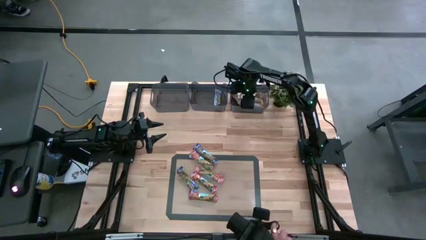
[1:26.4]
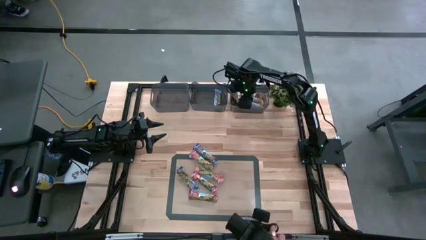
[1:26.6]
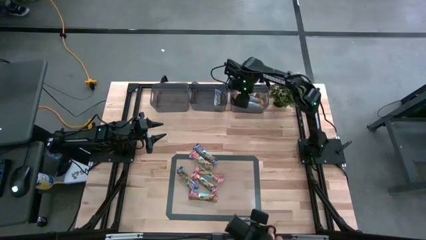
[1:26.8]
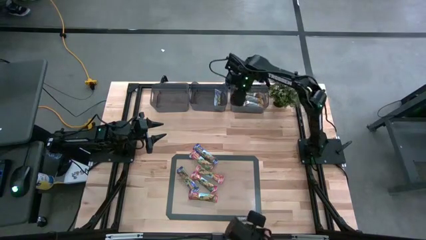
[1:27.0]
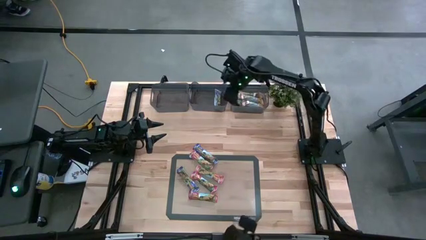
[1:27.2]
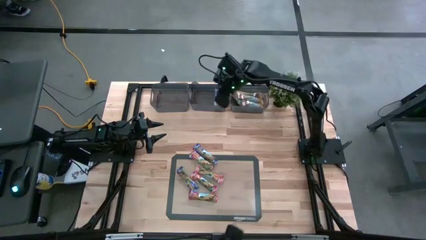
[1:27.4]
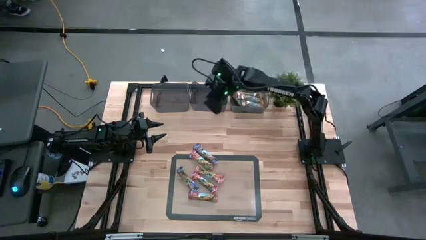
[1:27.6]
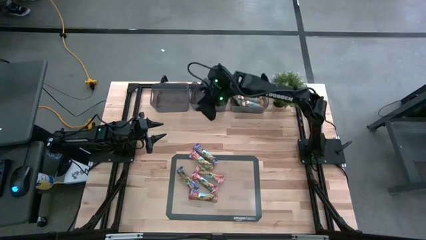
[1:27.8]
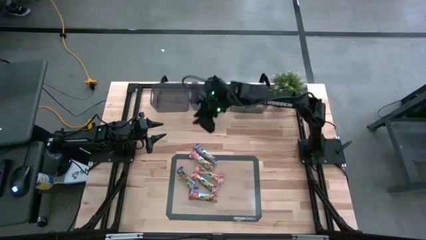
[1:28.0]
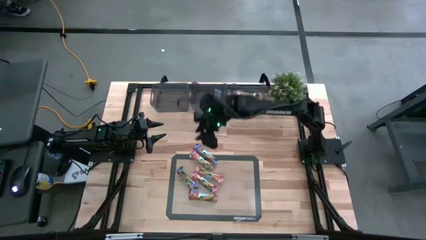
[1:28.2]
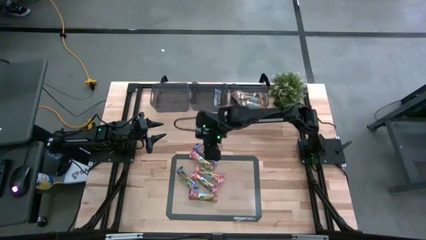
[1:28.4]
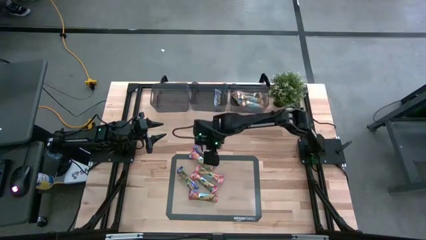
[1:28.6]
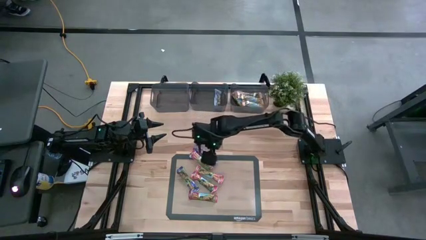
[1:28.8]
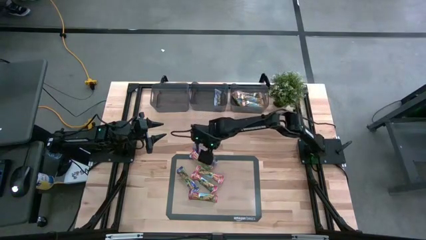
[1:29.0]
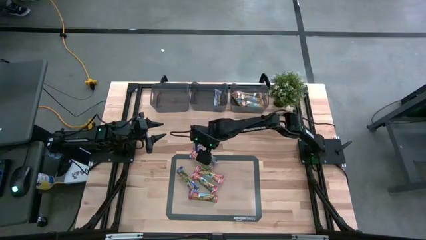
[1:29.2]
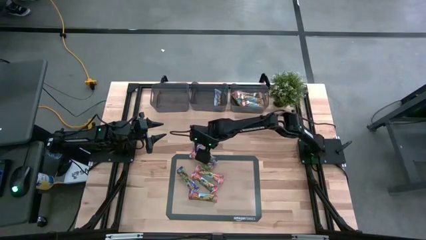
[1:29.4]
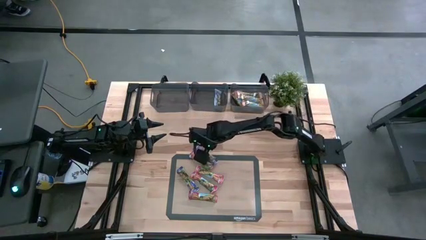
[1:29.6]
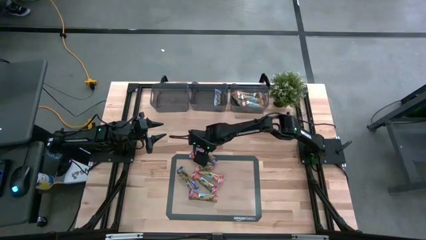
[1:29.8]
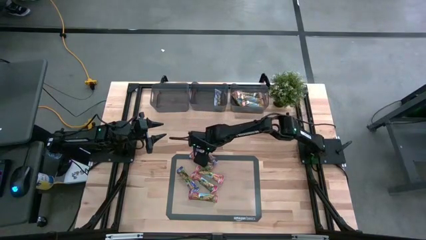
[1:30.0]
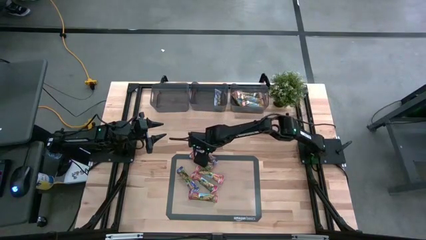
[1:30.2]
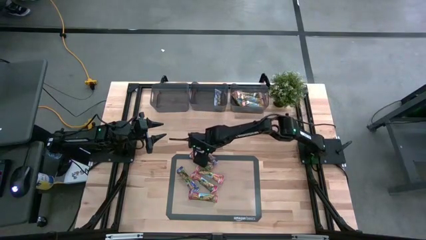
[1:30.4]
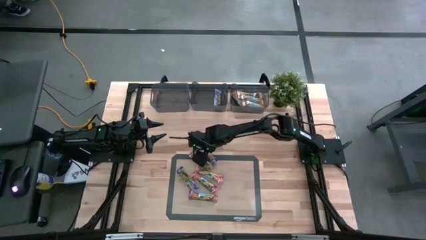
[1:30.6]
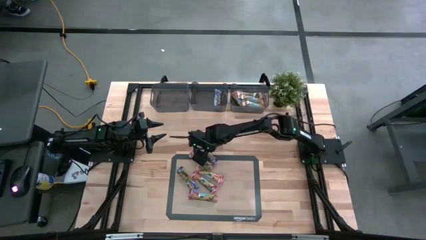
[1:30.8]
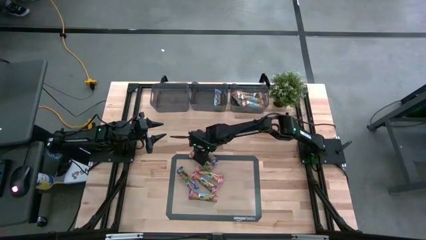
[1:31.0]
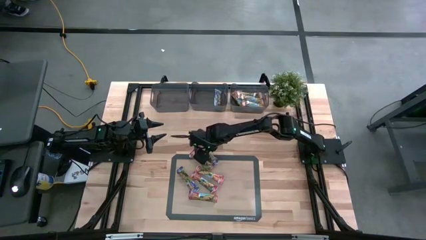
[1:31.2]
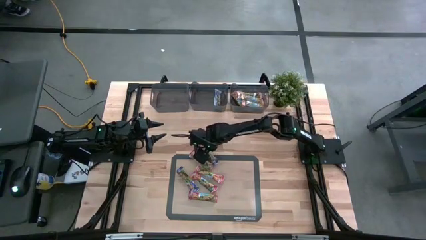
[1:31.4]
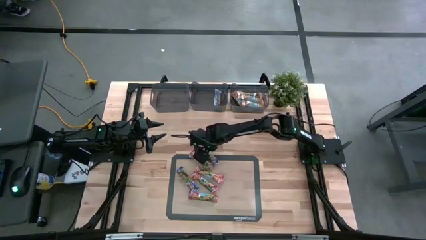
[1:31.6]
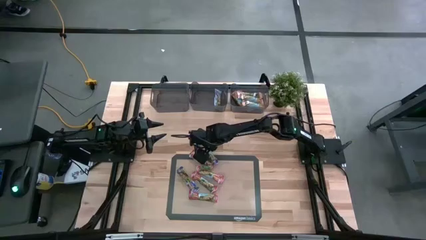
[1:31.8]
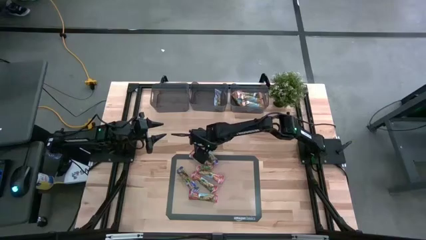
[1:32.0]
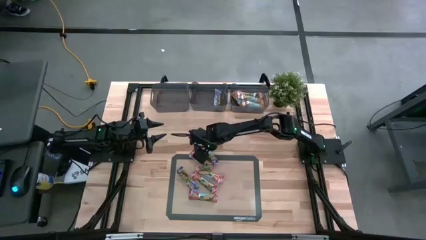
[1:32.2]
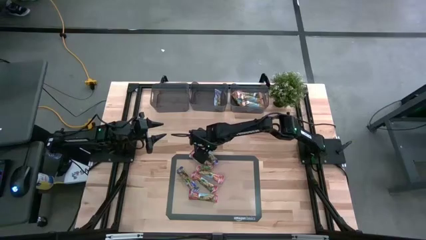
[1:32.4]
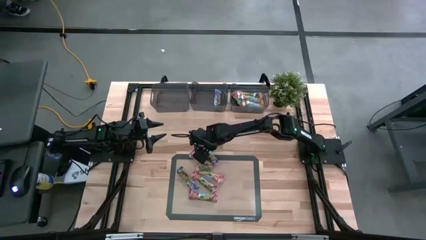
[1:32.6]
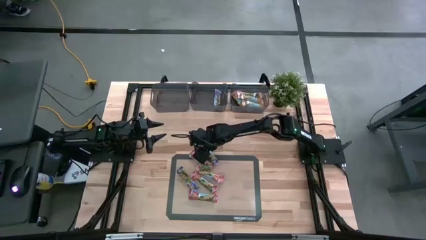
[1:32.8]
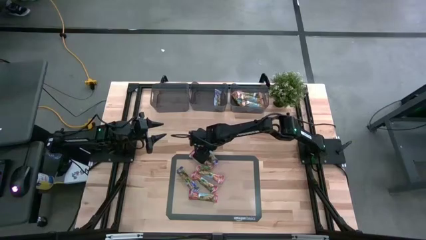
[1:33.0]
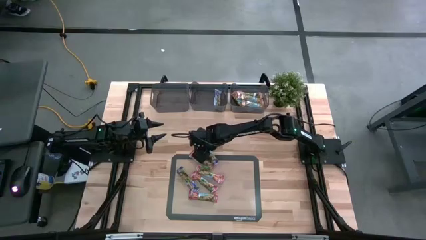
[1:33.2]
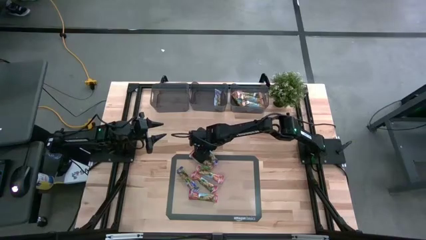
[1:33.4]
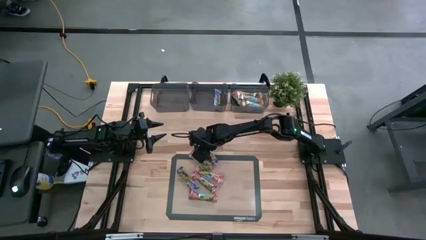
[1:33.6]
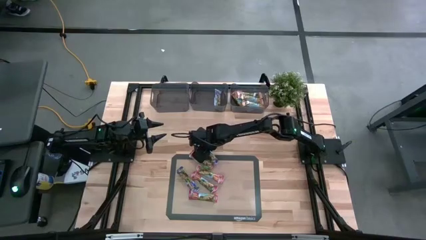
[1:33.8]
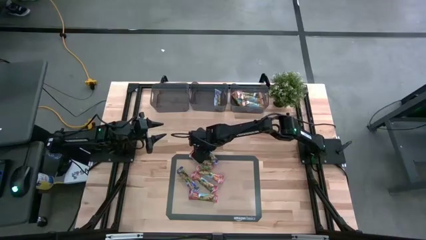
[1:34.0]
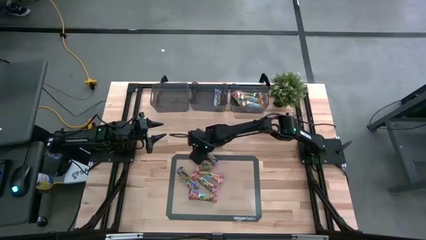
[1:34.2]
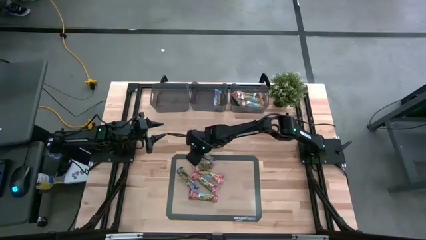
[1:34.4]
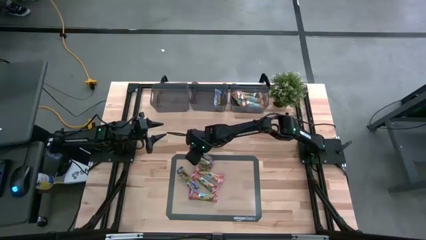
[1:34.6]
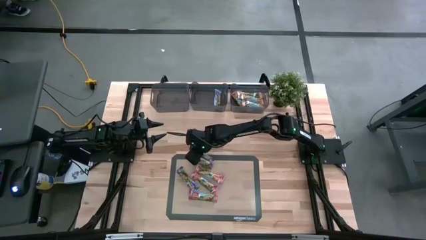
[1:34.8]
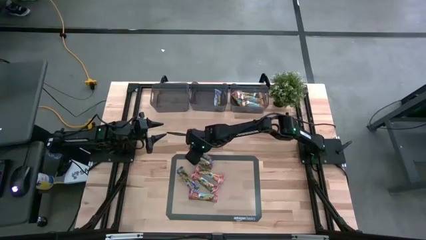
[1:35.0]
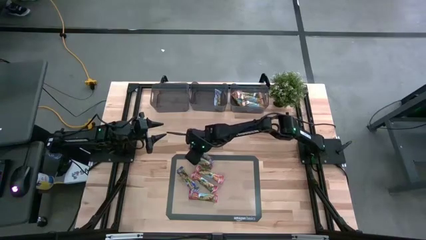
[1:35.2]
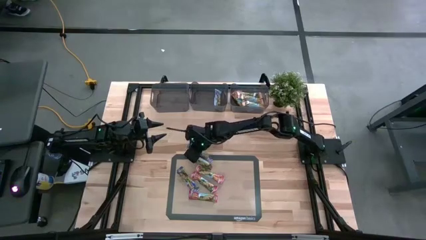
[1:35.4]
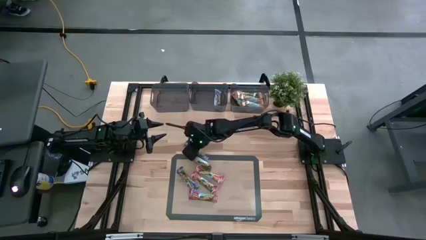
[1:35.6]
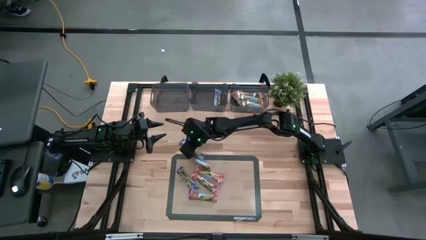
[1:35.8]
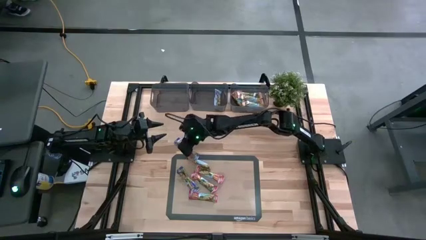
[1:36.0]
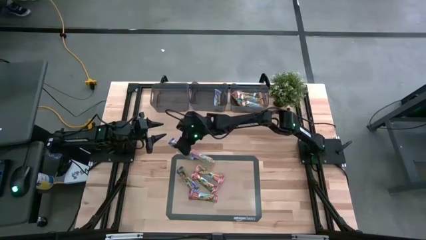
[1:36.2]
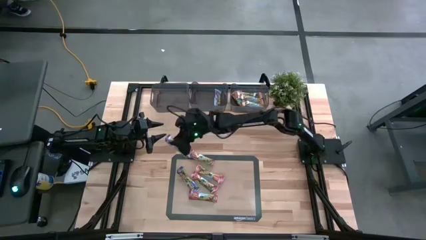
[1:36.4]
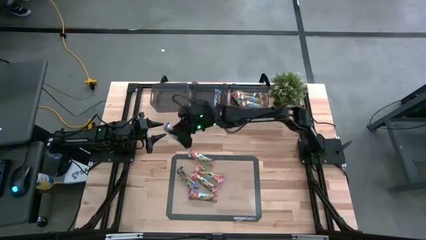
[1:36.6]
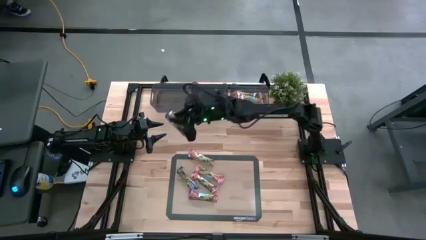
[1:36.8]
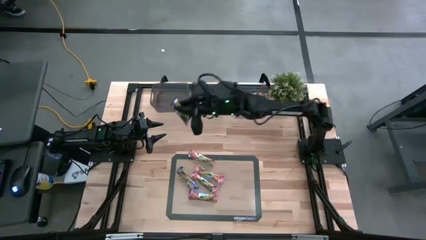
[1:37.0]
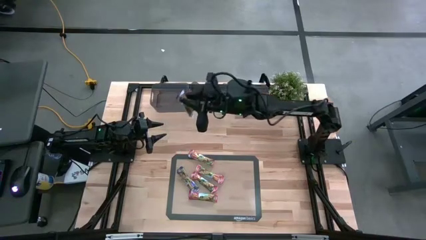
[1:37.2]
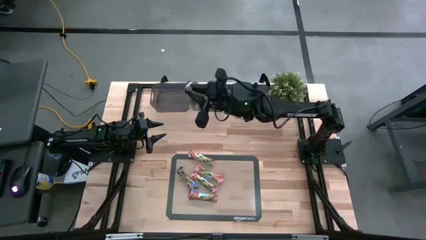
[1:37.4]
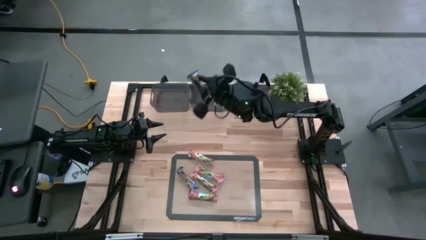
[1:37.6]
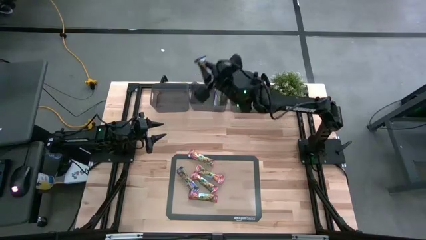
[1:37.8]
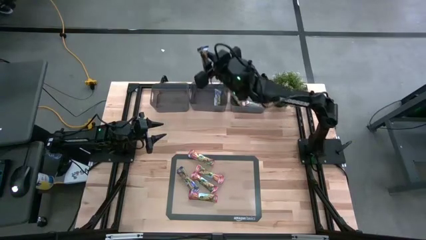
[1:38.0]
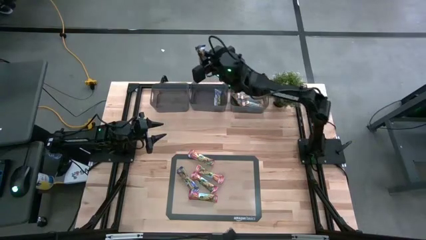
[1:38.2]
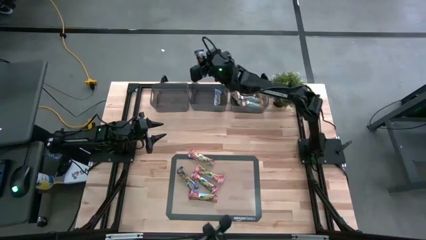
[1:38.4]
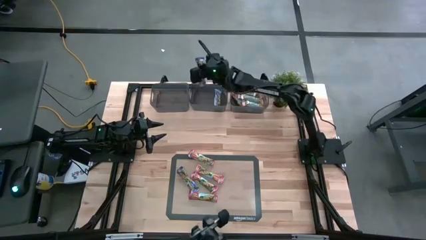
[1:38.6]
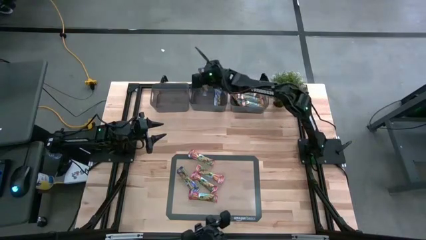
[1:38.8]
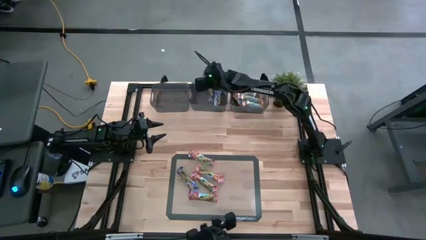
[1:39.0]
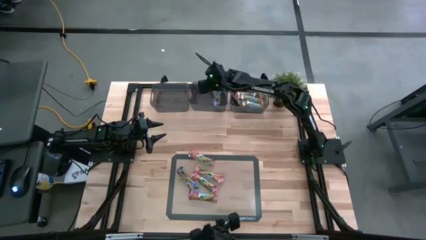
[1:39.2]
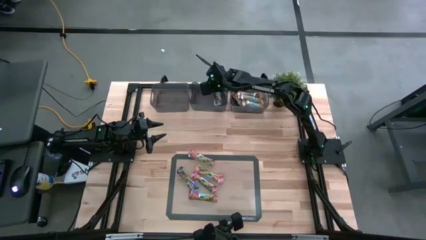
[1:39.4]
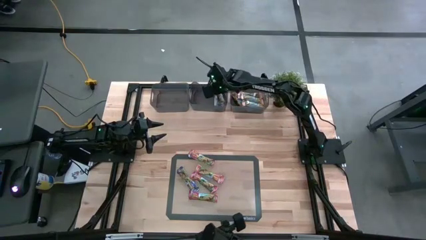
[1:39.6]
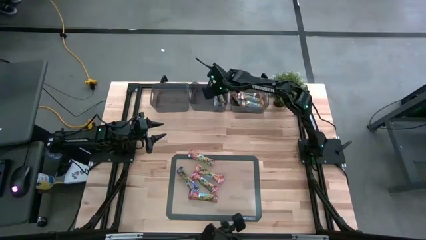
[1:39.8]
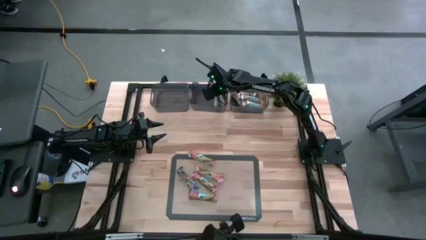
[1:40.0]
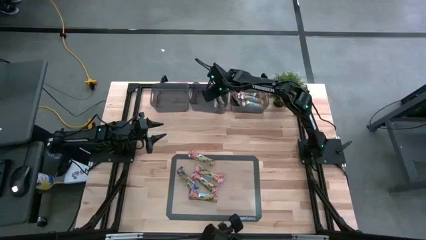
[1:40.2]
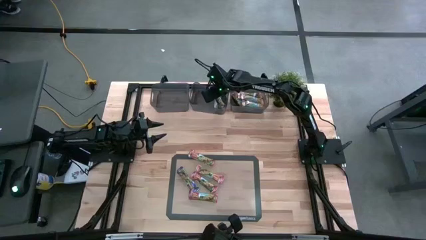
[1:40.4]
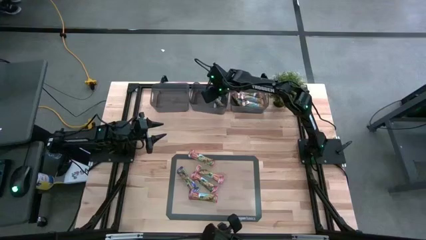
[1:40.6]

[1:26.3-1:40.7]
Task: Pick and place Granola Bars by type
Put the blue granola bar into the middle black bin

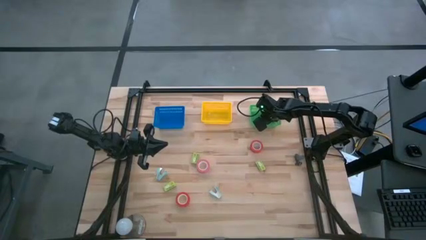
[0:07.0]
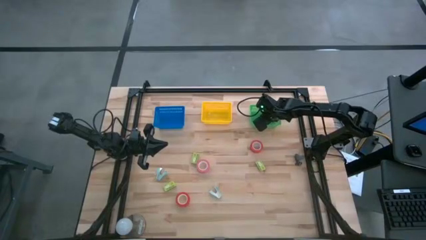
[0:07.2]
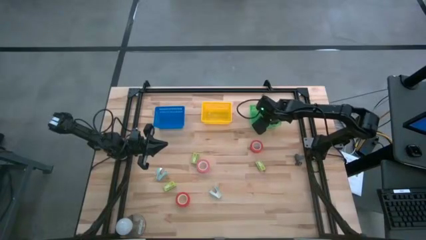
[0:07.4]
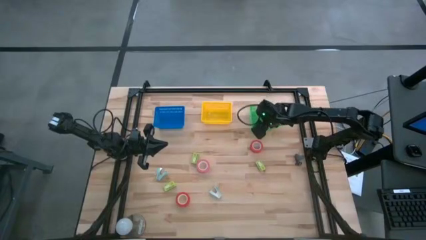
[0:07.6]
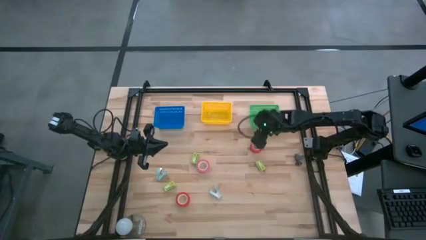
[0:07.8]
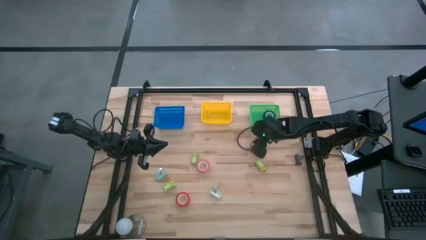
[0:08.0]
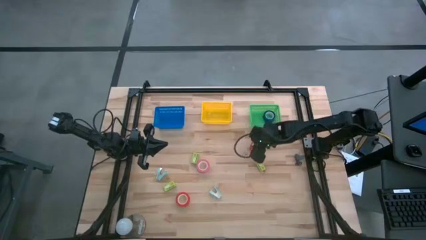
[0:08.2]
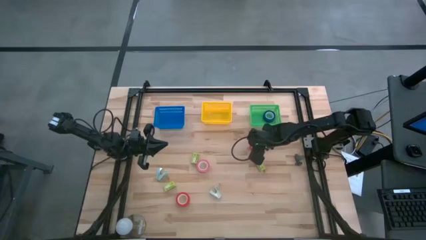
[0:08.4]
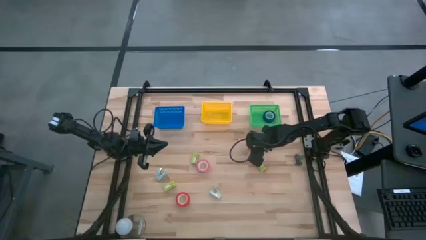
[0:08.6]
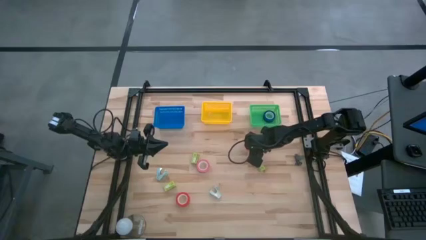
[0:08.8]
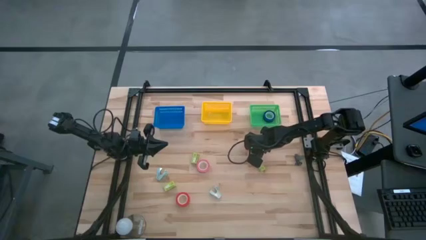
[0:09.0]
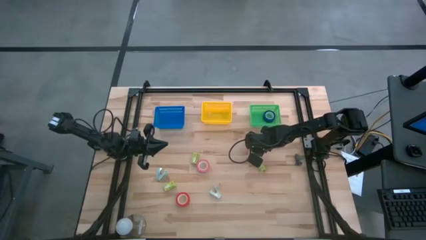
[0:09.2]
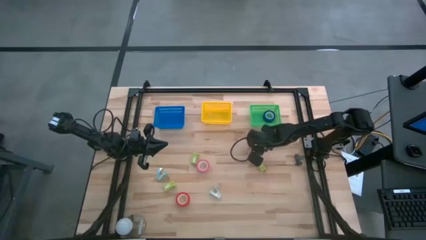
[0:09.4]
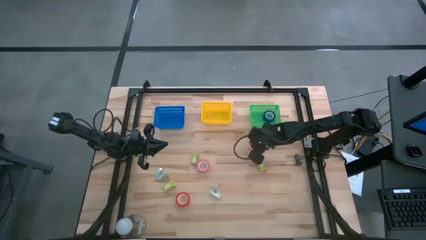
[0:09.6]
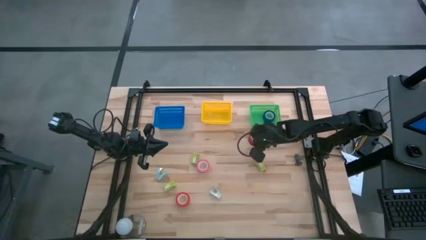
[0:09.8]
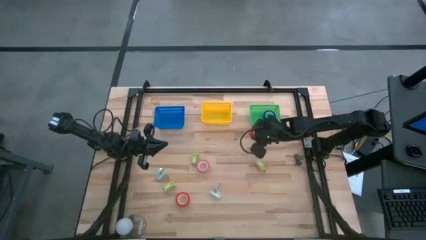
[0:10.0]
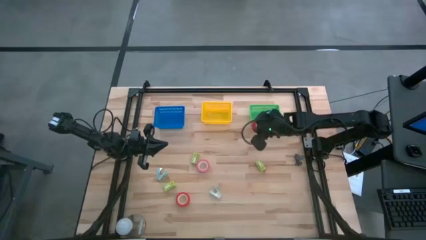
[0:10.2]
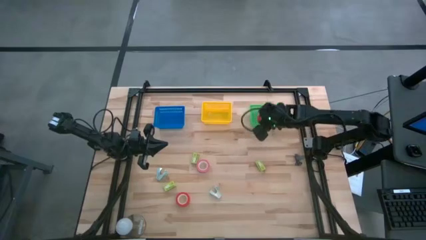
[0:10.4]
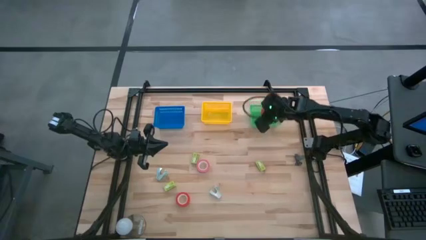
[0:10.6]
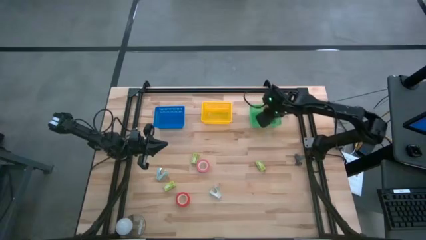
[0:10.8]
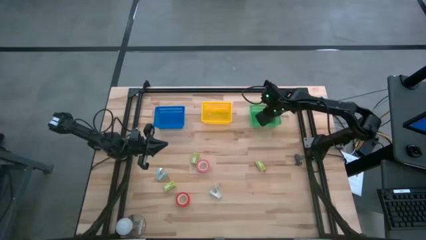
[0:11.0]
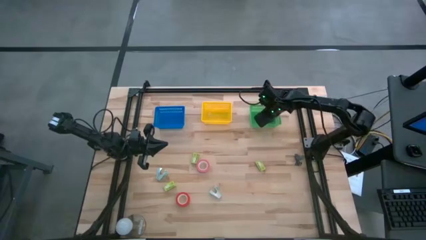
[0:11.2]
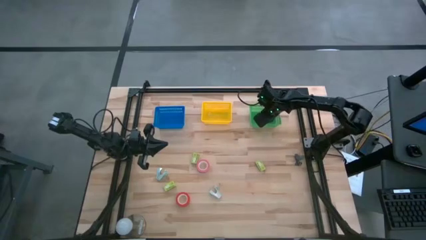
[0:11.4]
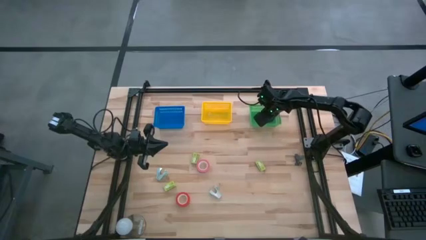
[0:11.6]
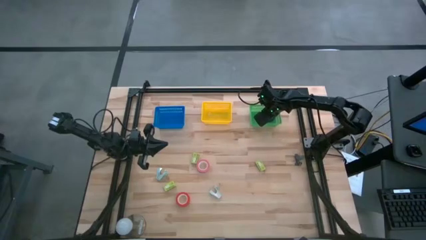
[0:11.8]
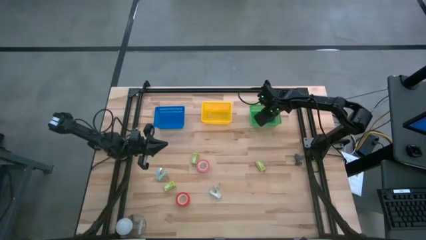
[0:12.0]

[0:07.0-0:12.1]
Task: Pick and place Stapler, Stapler remover, tape
Put the top red tape into the green basket
